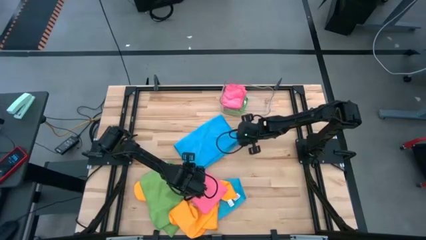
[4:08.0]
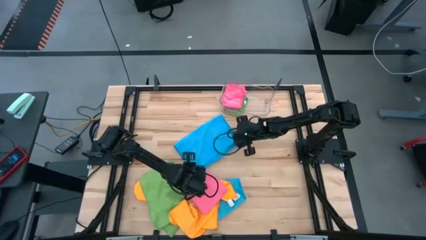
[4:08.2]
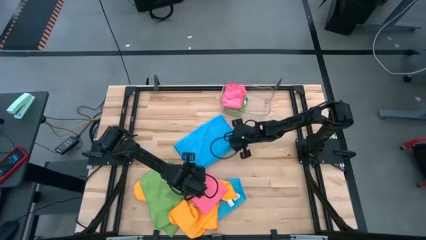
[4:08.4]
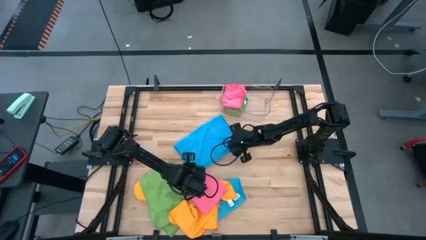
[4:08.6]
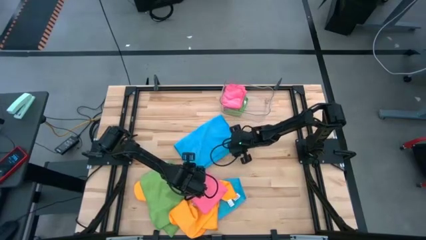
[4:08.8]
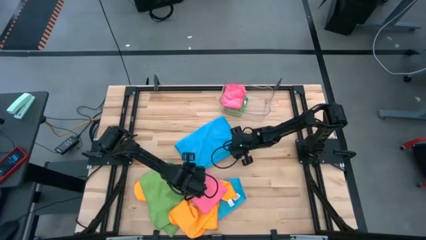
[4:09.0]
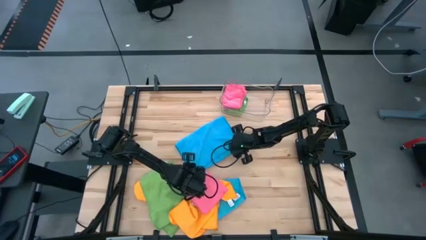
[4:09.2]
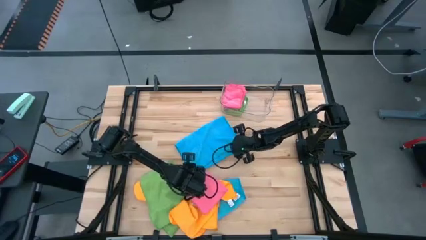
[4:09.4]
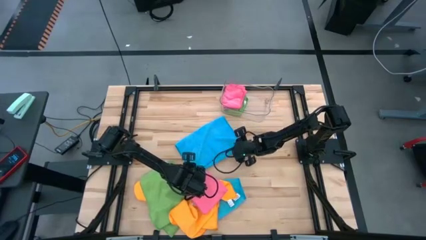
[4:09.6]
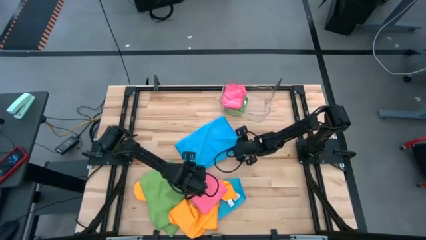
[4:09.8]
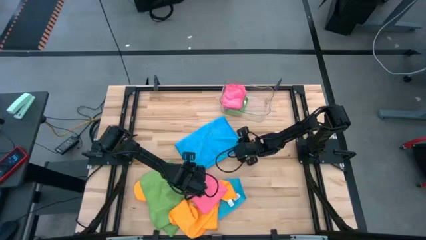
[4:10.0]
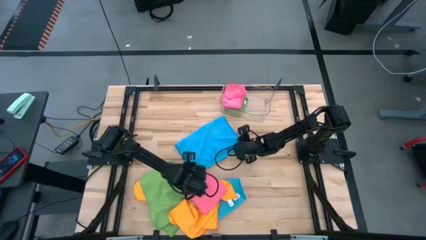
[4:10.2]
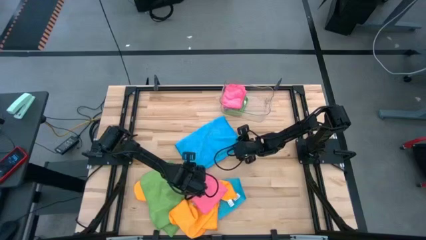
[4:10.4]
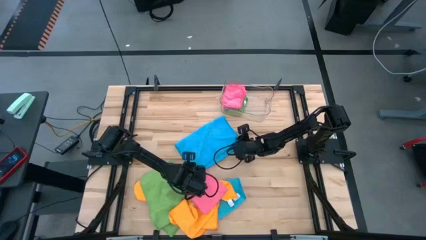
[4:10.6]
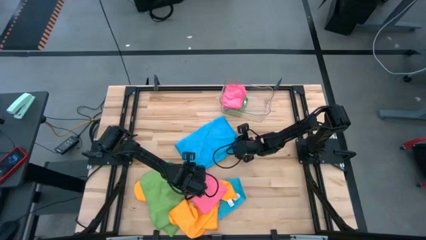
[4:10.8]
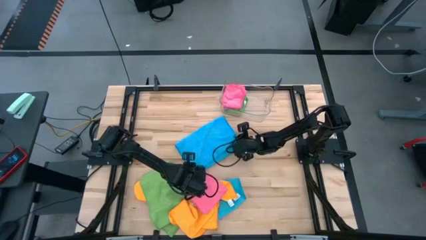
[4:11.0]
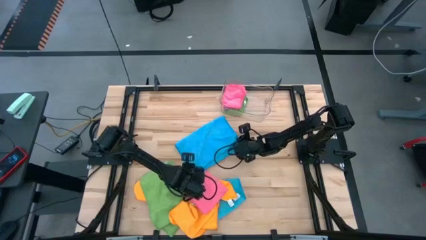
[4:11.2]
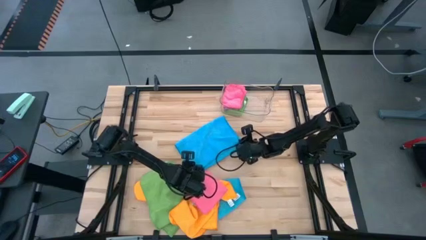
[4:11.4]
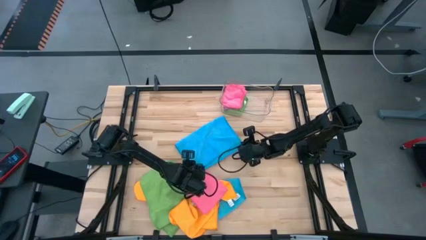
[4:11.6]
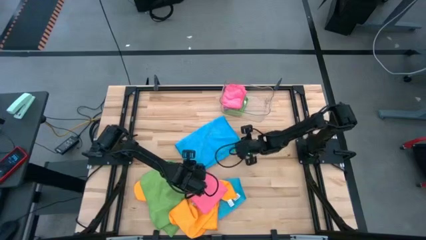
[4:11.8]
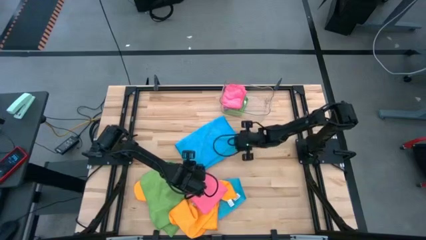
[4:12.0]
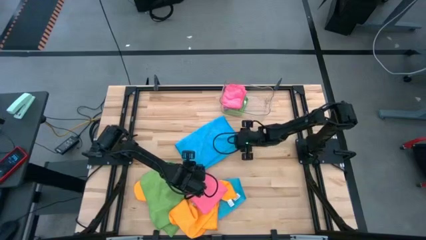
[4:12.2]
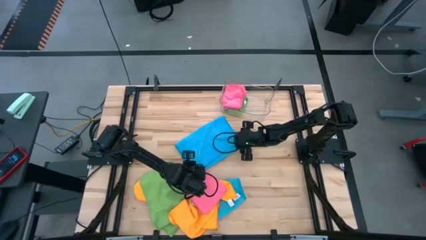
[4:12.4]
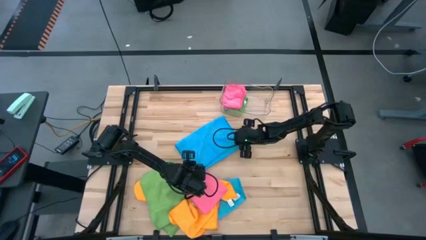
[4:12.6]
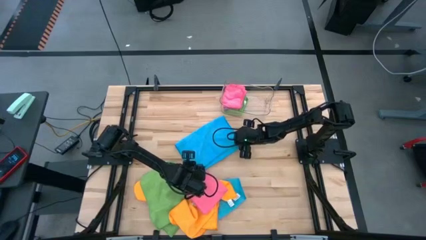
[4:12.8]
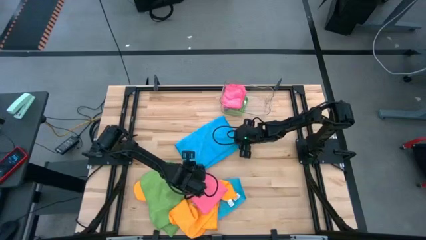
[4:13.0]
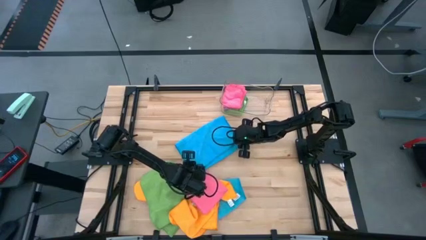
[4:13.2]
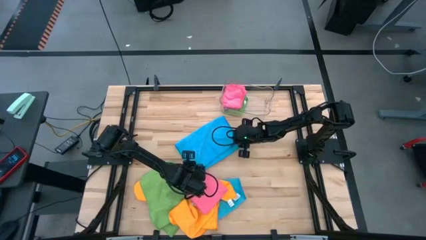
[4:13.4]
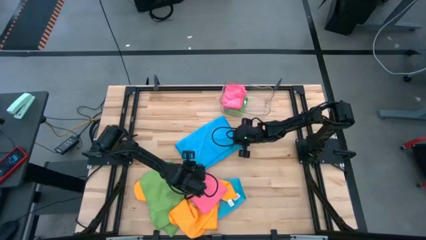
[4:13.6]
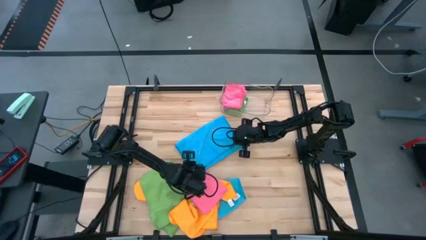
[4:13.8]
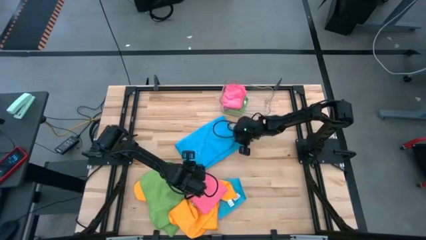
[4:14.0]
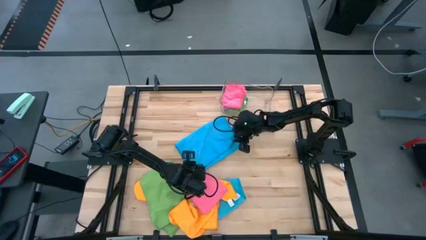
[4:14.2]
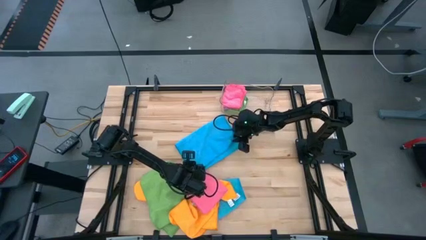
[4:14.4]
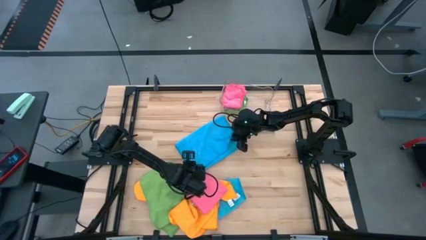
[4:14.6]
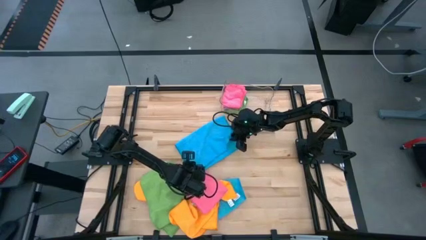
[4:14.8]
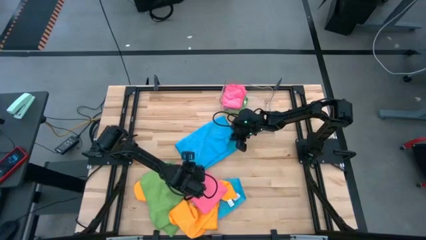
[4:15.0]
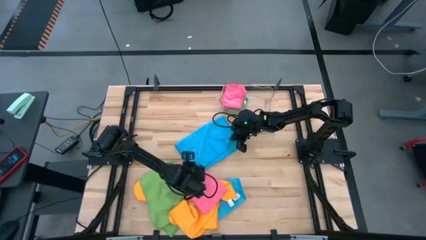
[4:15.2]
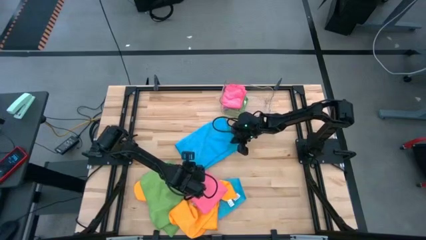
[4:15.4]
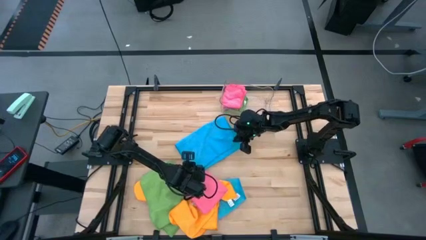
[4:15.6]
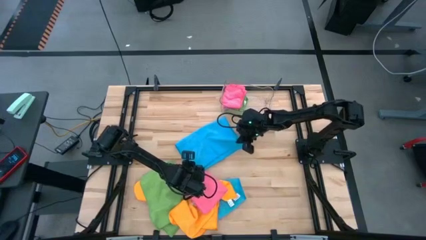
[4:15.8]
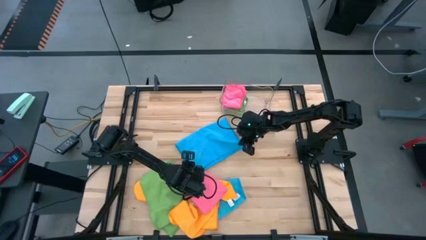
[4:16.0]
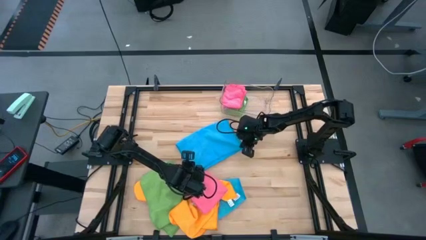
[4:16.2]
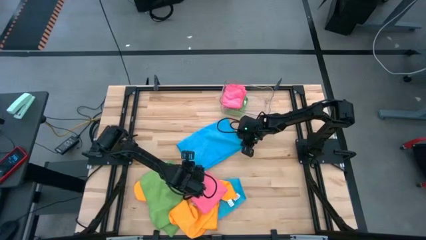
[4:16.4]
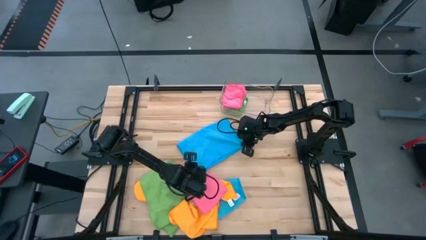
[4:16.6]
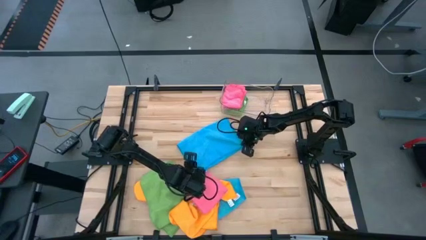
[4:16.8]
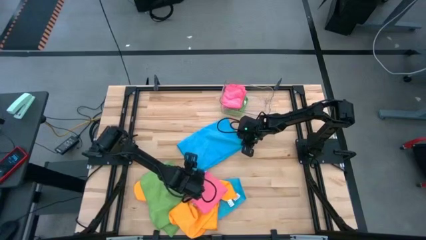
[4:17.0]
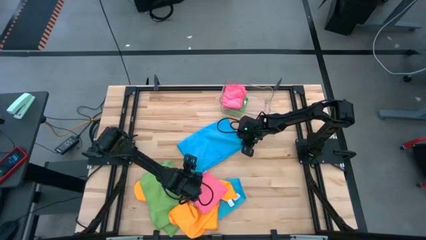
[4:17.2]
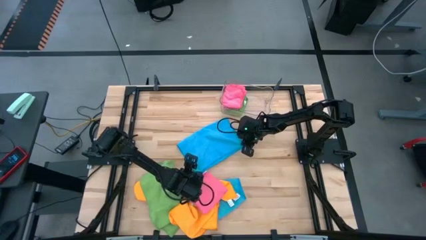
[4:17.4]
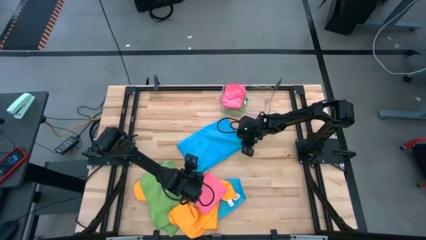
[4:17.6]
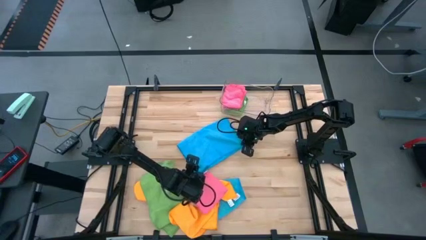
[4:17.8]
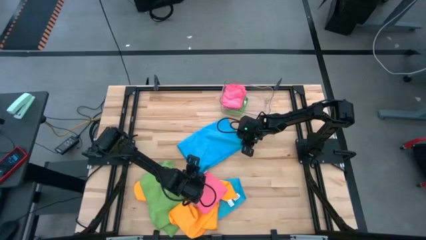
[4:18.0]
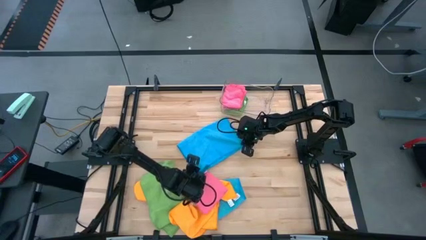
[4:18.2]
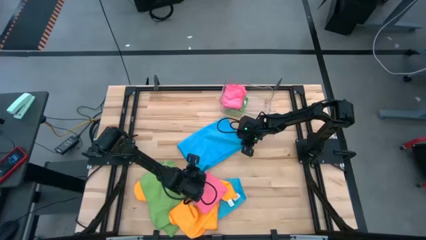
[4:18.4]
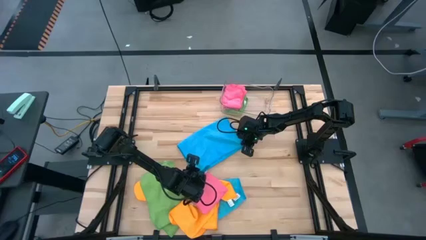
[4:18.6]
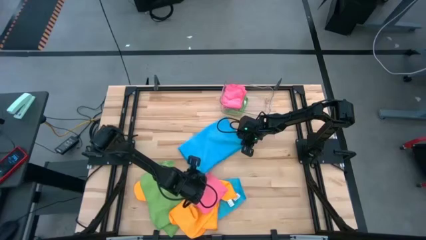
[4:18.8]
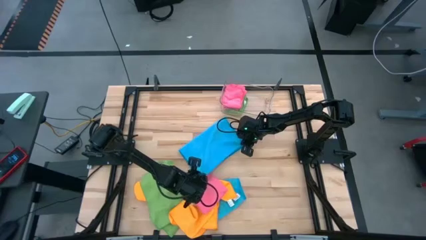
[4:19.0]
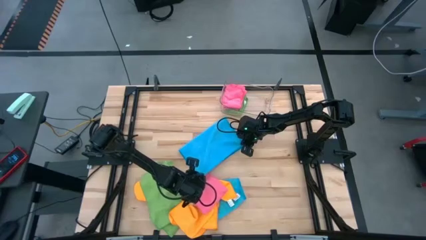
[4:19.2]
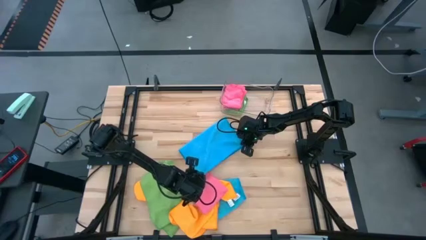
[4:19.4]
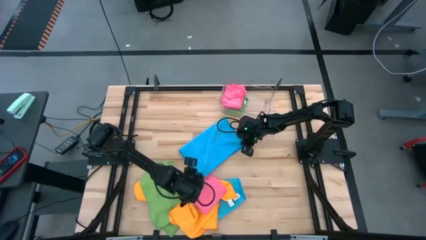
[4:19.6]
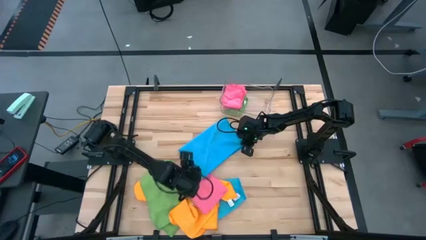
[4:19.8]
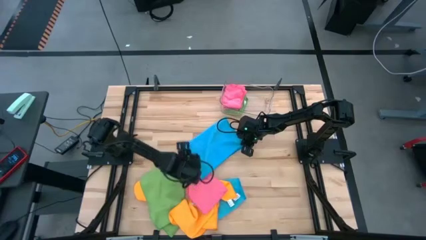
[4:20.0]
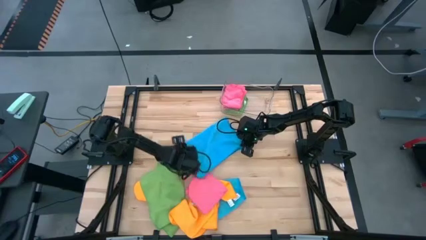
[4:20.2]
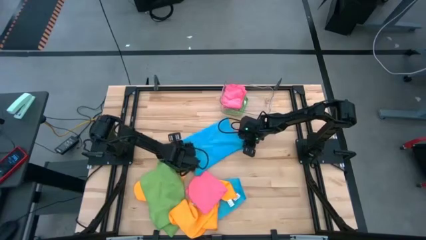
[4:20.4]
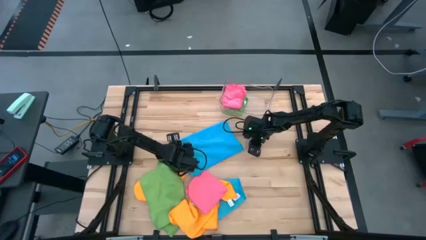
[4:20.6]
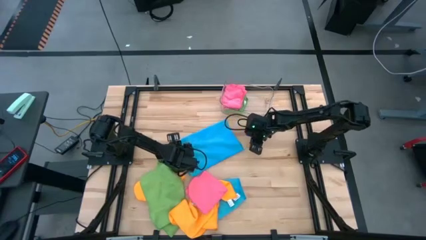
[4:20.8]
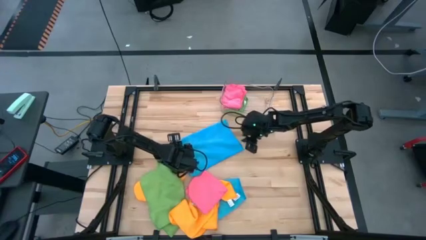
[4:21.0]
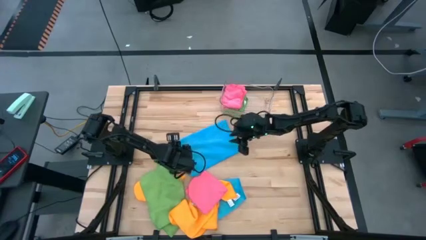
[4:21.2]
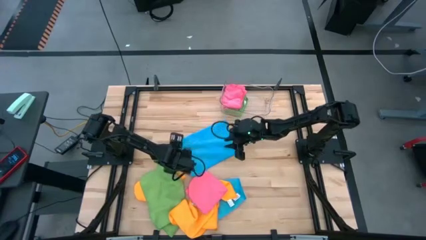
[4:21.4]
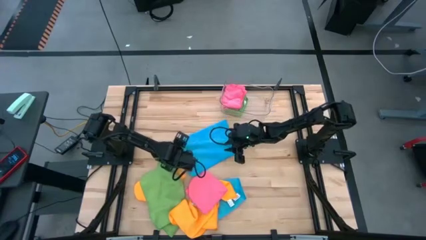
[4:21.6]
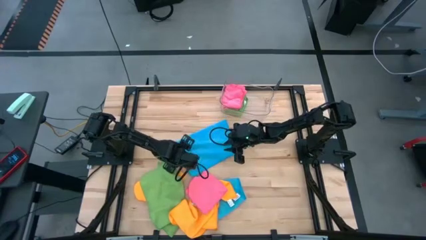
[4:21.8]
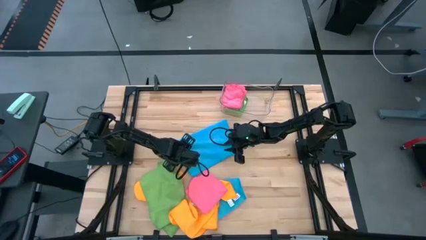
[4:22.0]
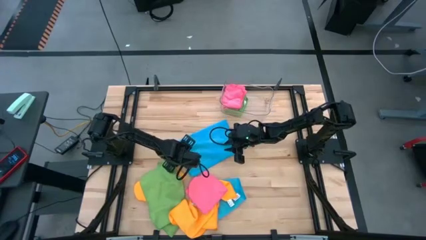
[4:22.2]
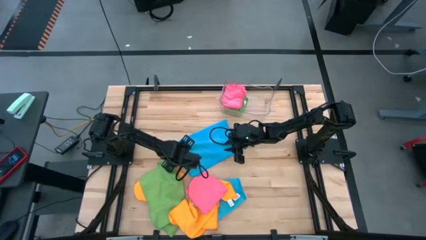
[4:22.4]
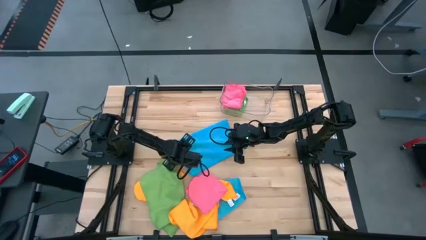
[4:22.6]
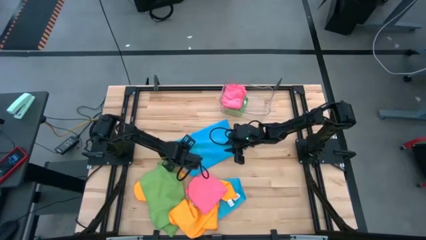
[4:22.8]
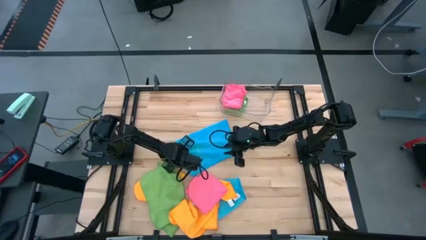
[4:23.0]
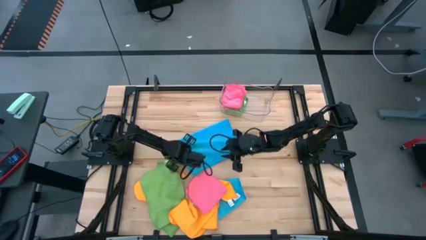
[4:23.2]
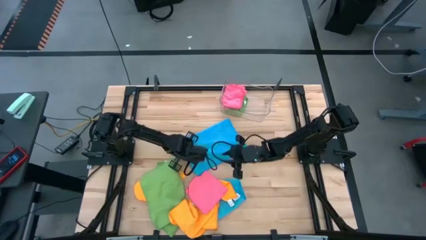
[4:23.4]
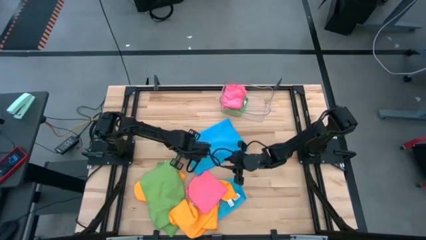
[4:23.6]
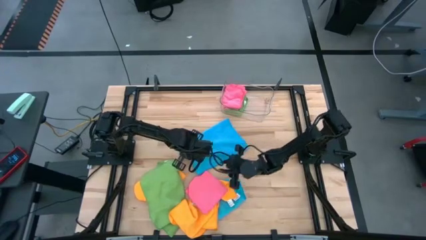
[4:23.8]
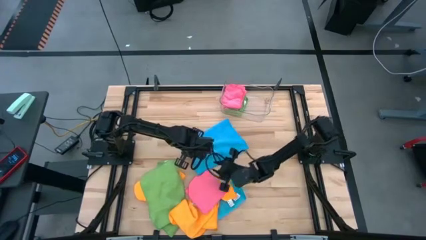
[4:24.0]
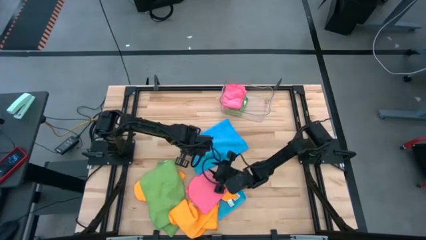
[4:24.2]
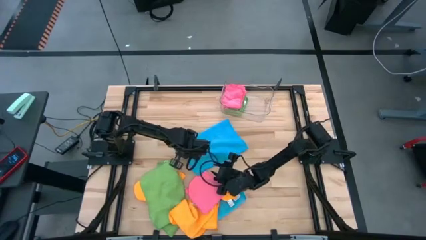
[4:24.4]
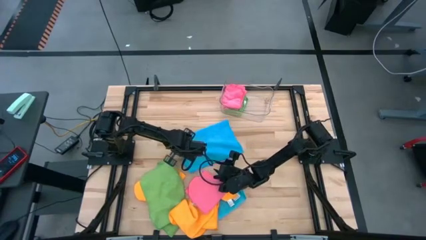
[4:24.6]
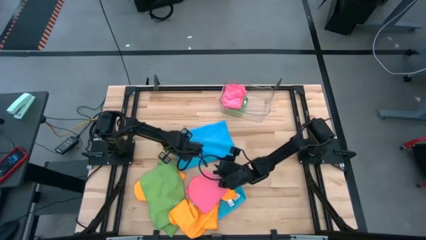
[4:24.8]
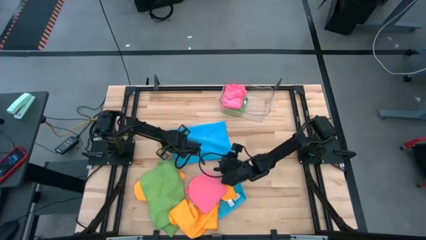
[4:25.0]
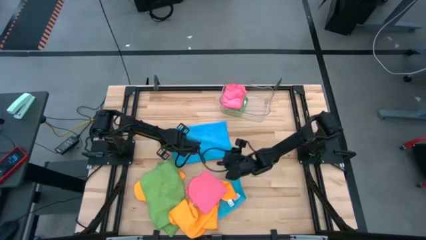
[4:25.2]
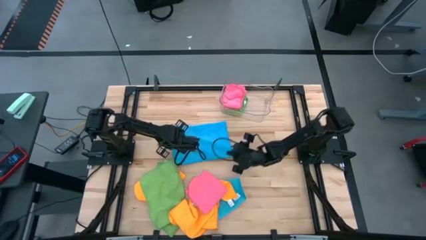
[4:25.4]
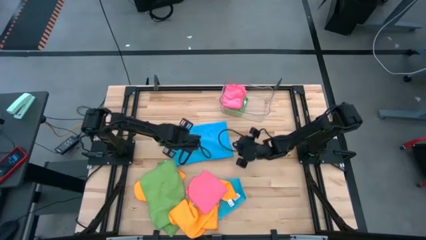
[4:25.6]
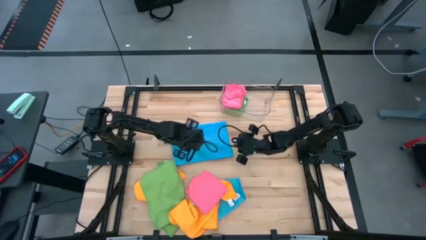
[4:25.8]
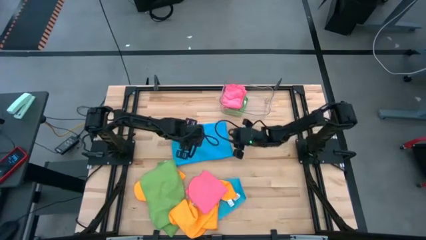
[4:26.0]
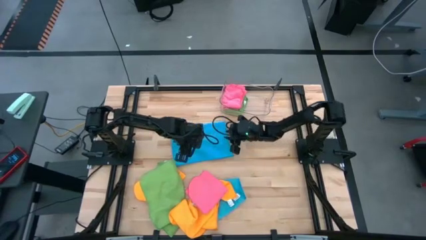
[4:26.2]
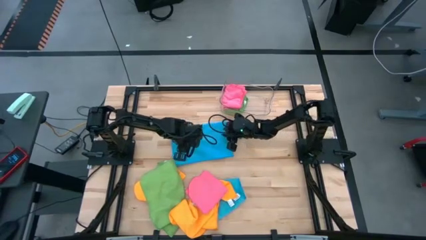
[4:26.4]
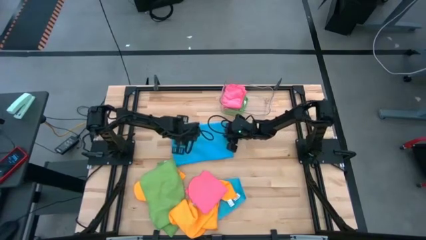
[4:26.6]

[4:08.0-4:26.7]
Task: Fold microfiber towels
Fold the top blue towel
